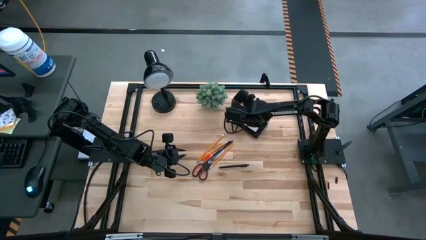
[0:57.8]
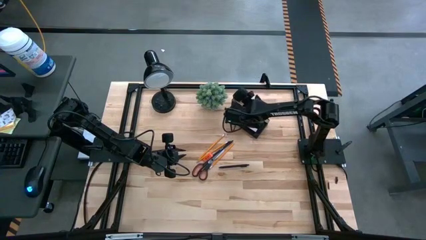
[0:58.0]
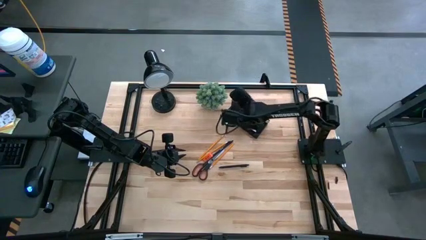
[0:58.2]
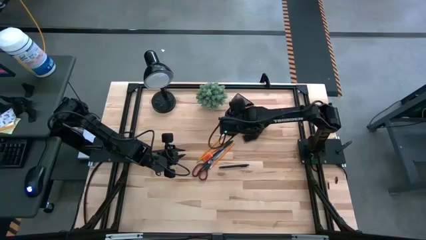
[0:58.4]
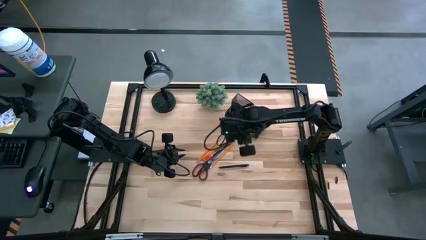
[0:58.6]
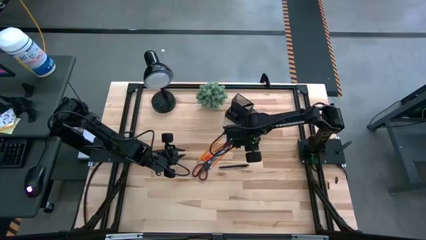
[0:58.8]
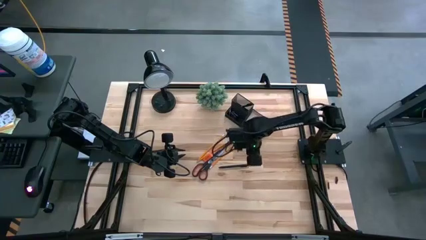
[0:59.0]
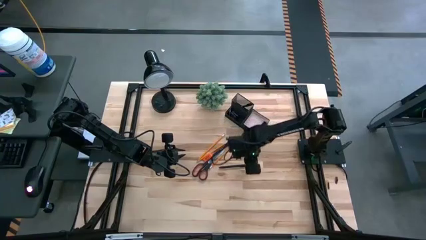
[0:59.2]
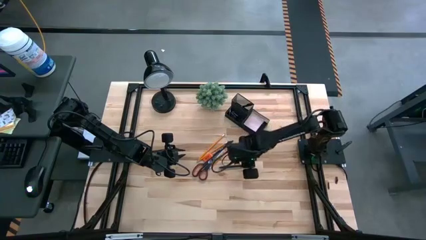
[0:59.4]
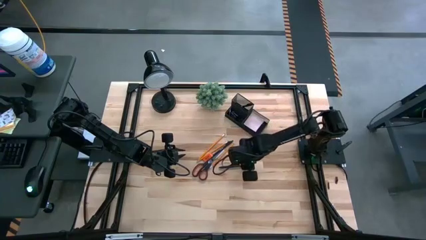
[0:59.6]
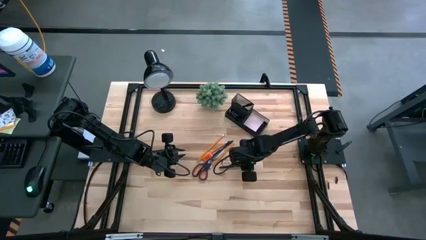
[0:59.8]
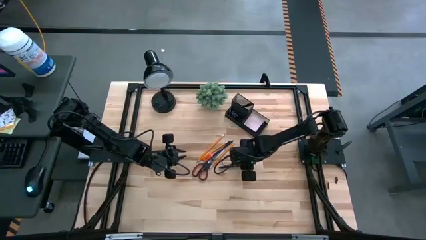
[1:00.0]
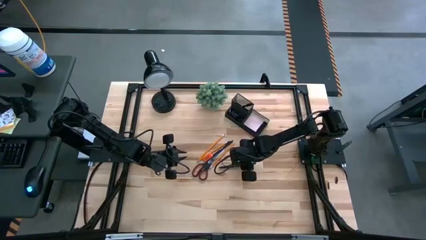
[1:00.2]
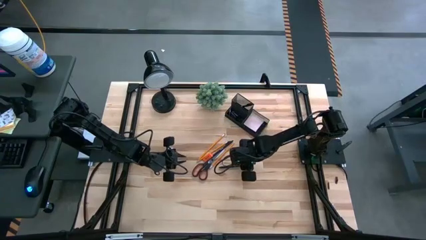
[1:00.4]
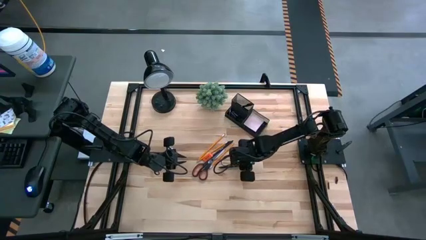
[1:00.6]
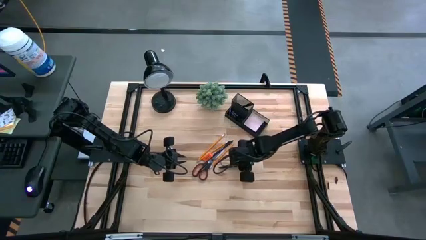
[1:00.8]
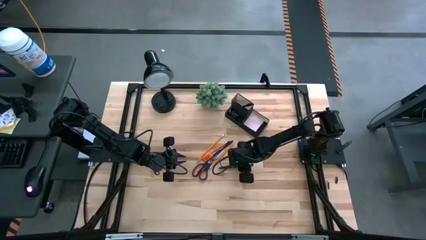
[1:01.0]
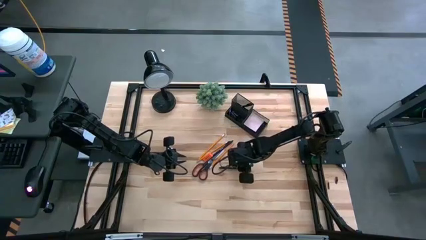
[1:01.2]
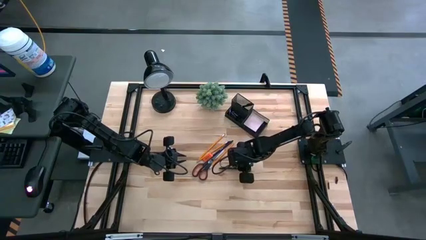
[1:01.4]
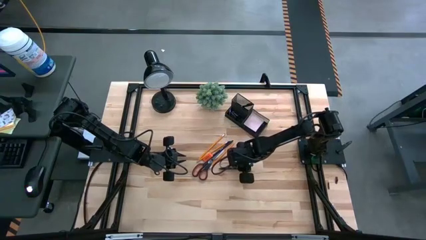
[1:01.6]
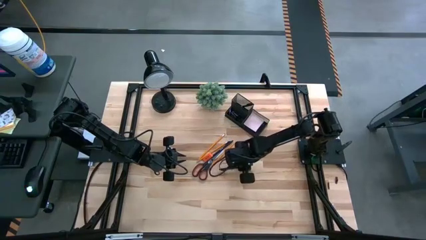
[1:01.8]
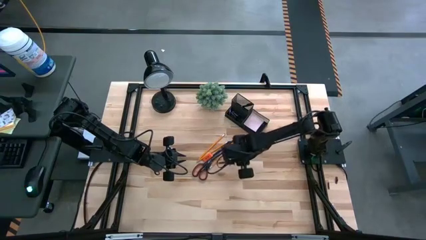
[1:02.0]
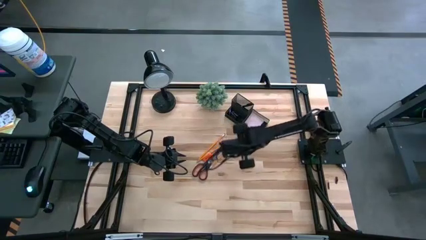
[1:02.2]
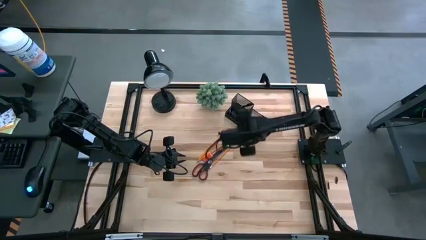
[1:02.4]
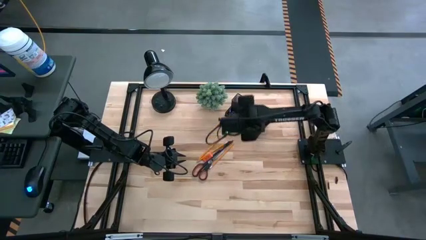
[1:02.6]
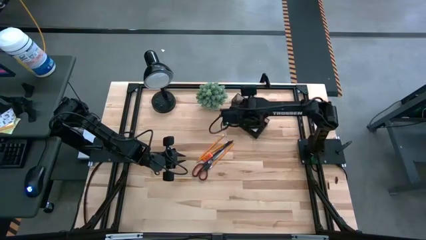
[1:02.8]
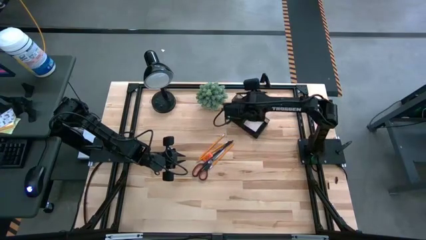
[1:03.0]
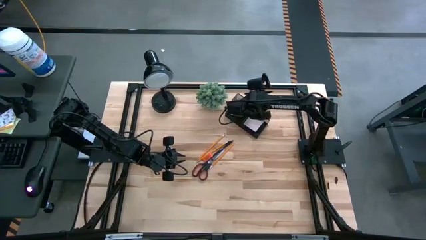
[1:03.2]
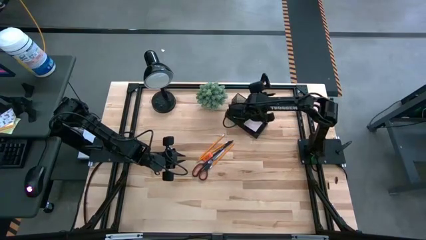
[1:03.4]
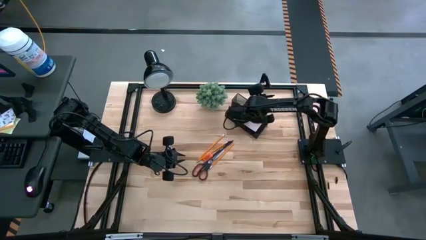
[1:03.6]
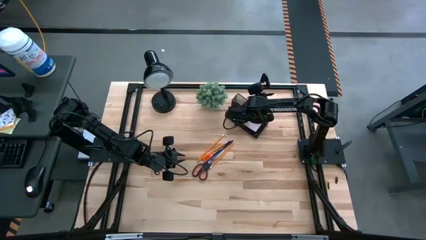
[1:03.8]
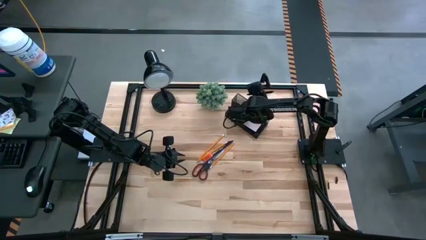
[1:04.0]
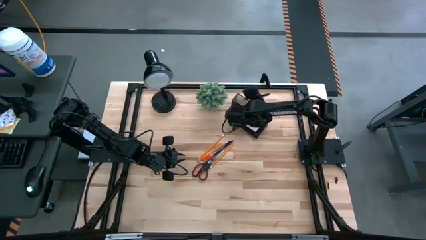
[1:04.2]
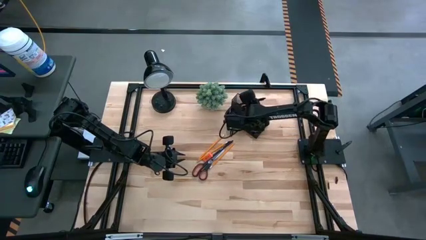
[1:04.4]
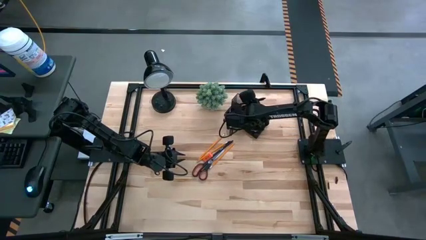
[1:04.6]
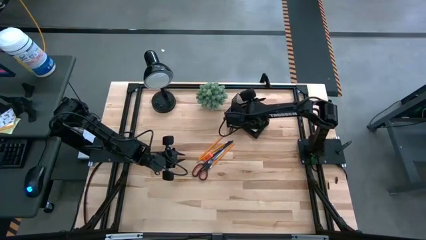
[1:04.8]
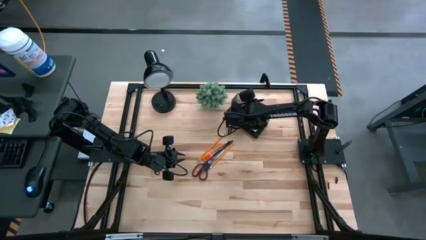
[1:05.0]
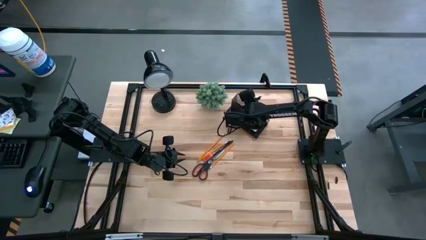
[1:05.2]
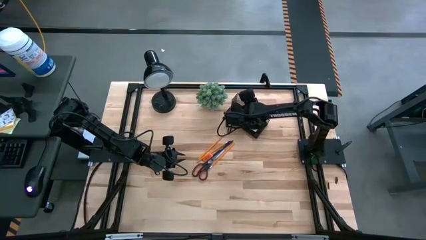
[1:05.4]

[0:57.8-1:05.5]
Task: Pick and place office supplies into organizer
Put the bottom black ballpen into the black desk organizer

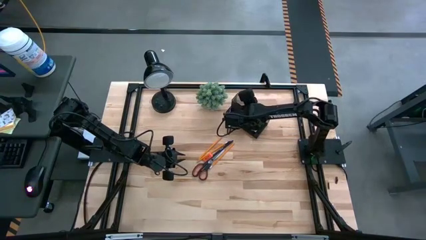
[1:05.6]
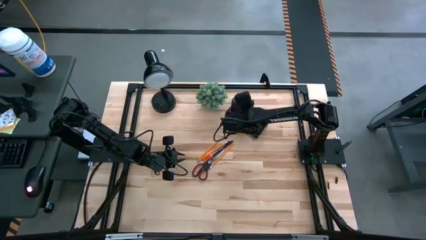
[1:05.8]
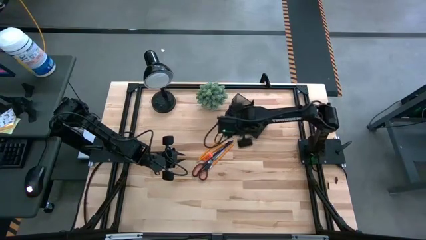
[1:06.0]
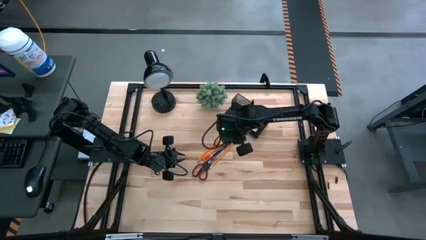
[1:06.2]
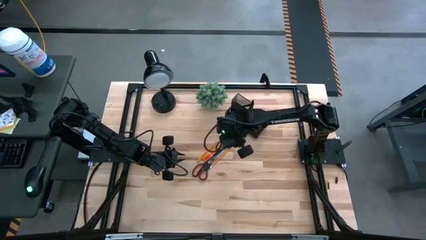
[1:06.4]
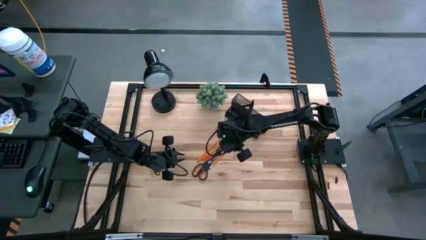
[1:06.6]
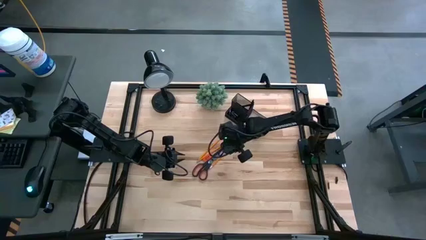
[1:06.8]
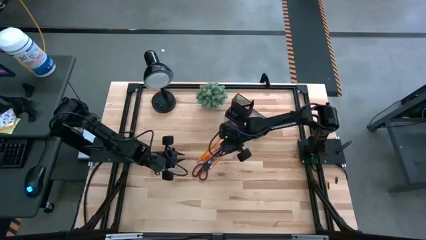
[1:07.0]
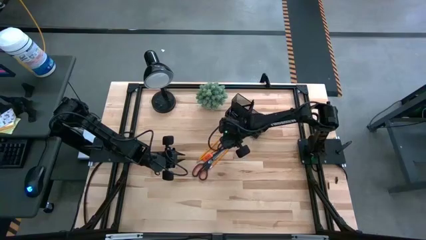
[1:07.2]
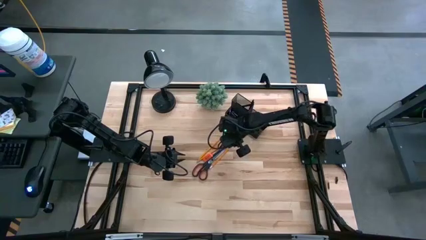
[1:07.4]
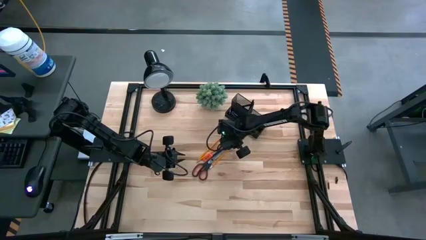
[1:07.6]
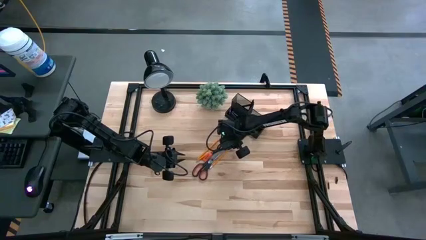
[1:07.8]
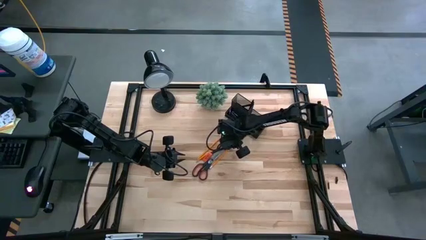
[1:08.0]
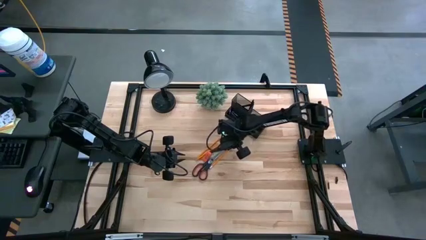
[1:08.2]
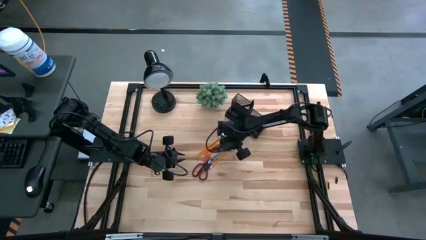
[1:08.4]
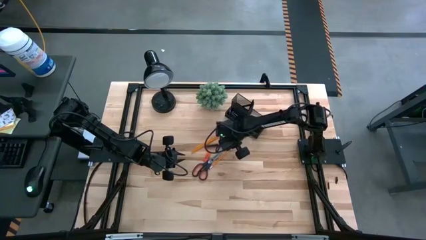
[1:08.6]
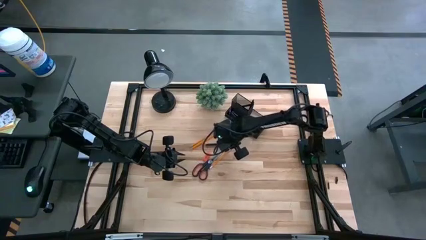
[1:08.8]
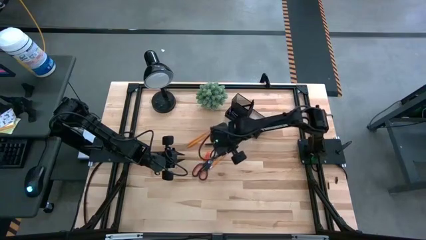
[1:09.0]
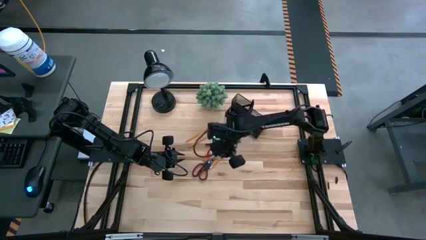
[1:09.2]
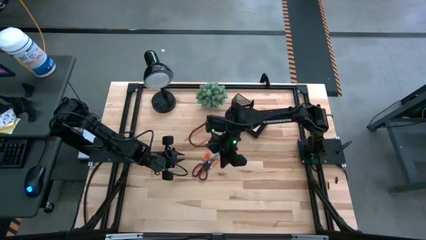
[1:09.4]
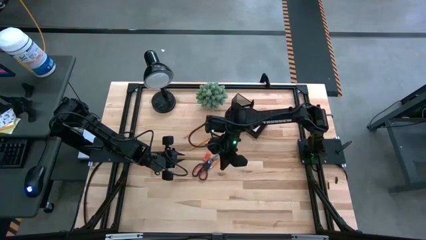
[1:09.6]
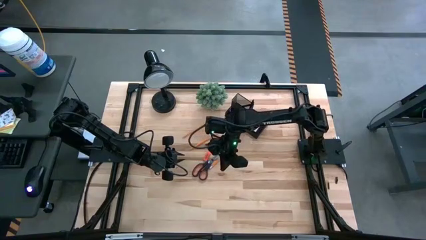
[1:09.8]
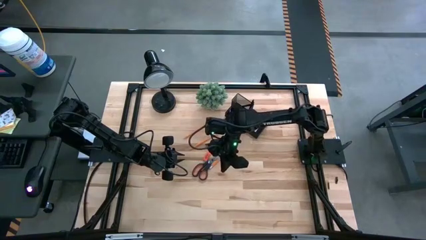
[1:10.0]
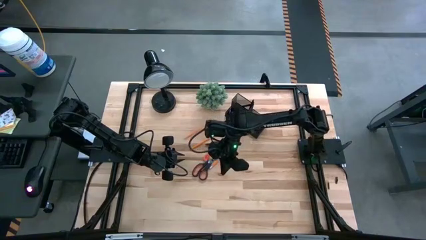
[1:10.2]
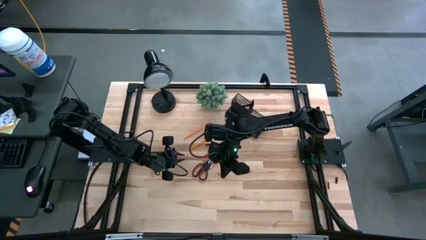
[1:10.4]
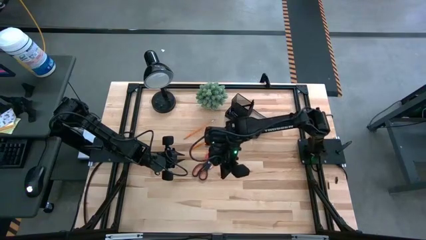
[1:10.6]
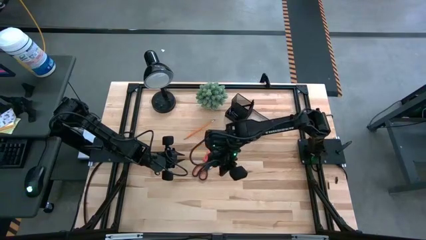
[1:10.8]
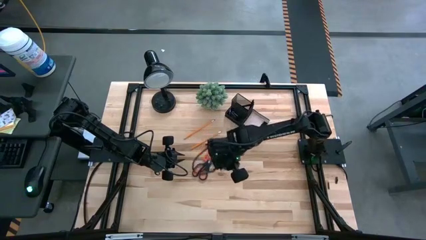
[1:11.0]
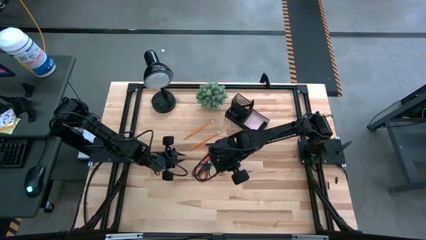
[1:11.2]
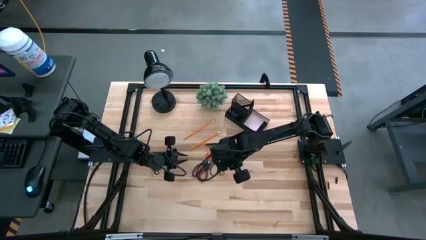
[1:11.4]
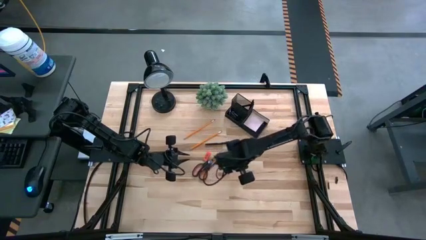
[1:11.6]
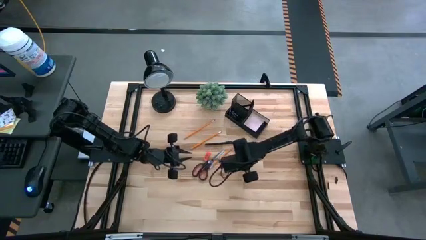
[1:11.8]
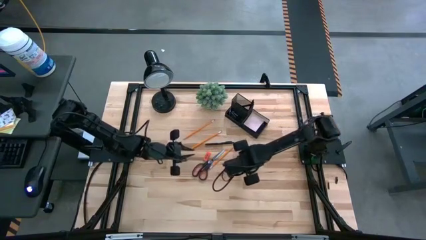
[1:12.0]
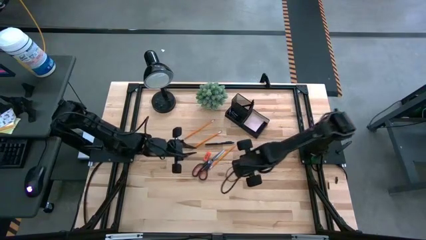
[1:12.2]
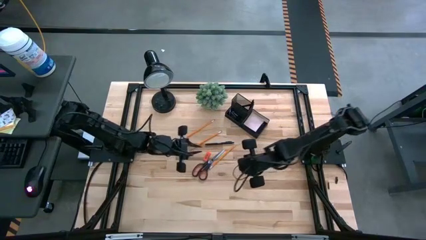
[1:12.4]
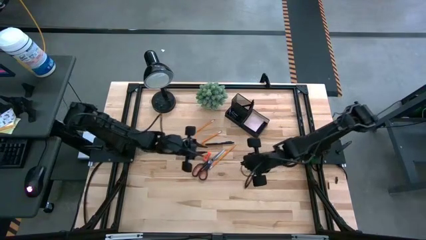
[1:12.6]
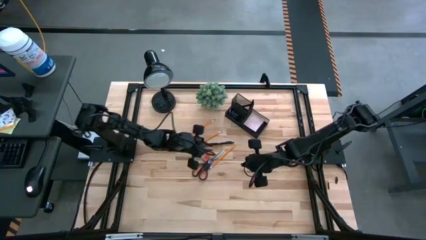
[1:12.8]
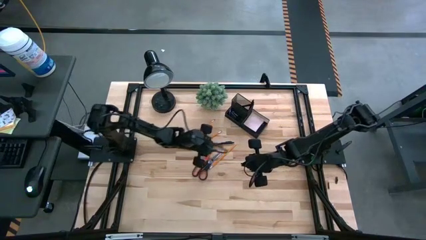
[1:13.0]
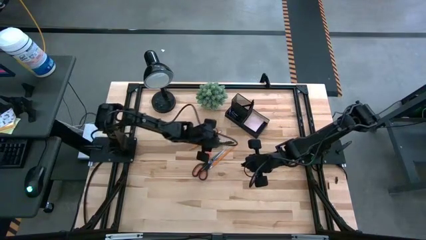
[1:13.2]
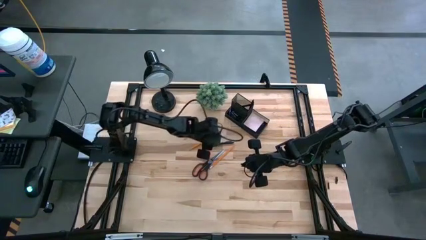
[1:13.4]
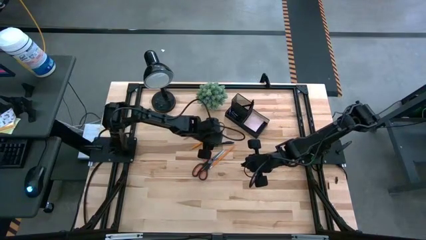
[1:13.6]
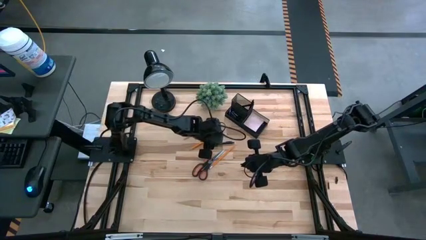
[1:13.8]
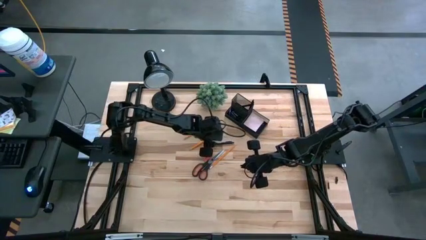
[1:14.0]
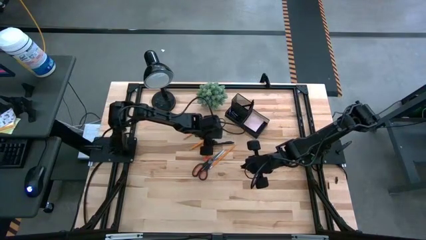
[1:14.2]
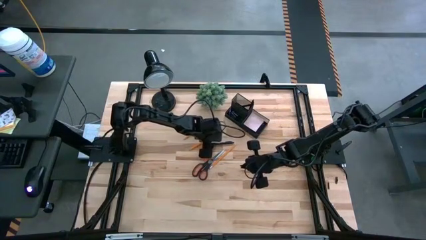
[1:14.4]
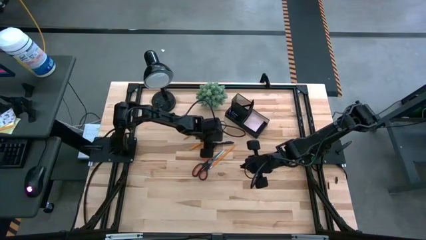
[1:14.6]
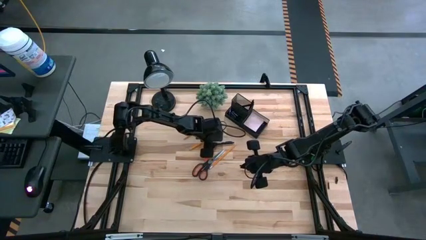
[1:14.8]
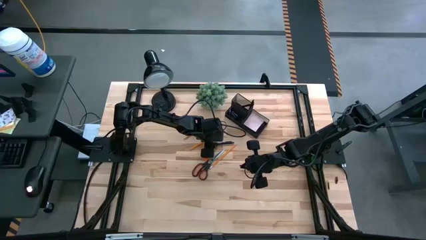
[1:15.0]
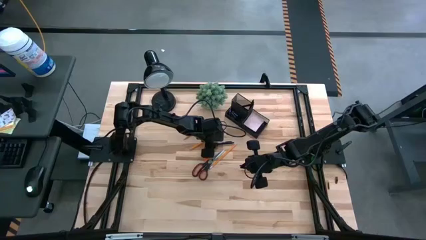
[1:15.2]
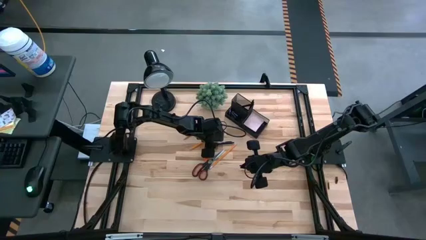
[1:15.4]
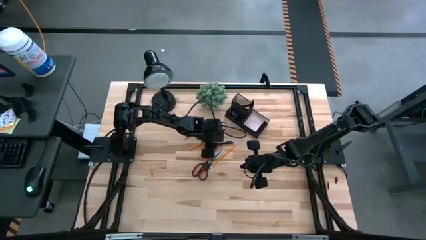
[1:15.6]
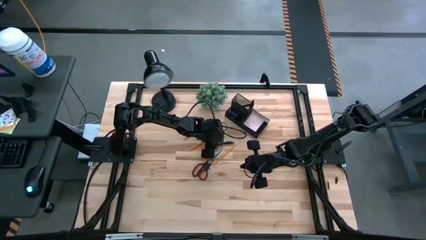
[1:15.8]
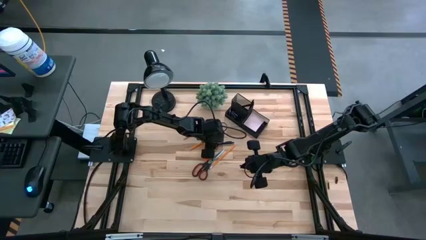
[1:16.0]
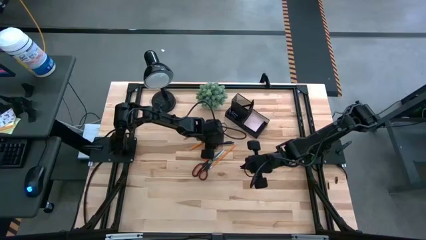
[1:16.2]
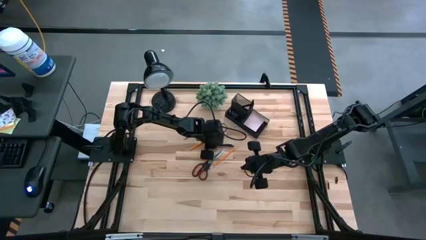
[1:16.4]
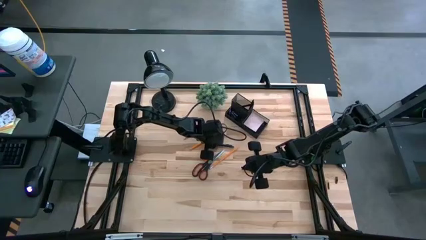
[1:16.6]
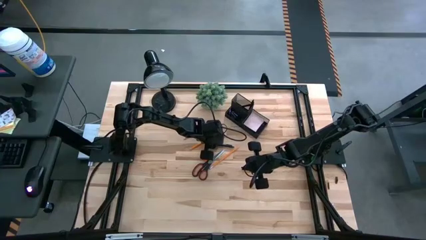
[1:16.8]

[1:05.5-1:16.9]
Put the black ballpen into the black desk organizer
